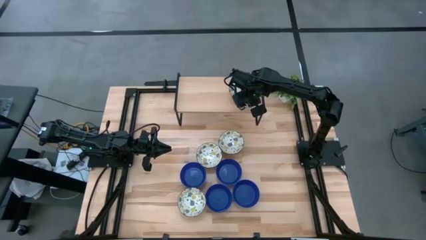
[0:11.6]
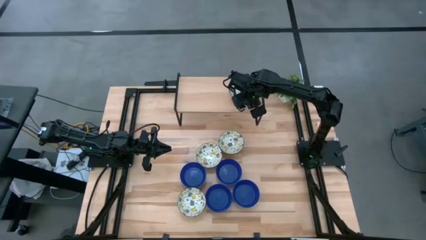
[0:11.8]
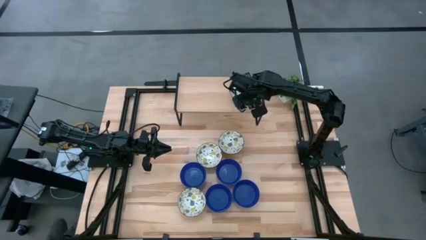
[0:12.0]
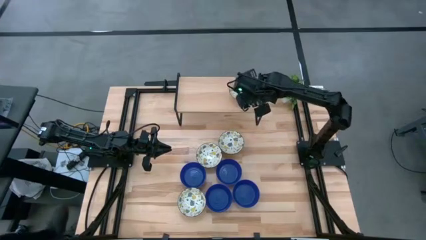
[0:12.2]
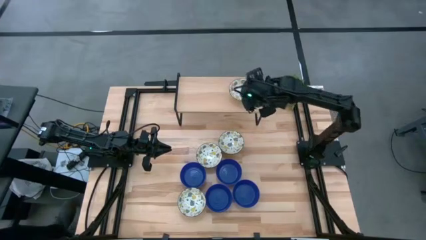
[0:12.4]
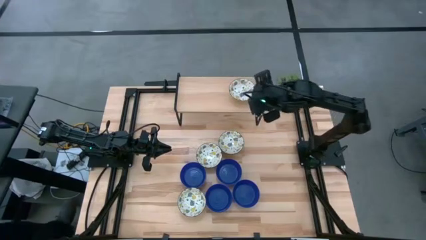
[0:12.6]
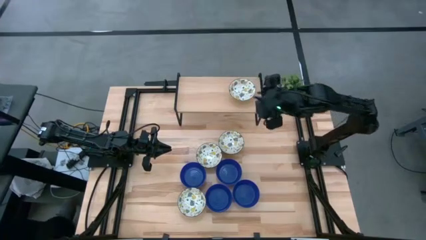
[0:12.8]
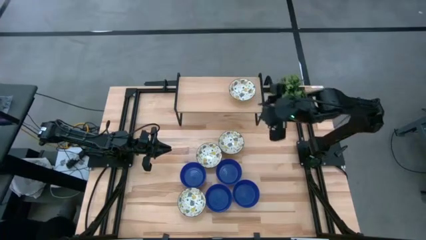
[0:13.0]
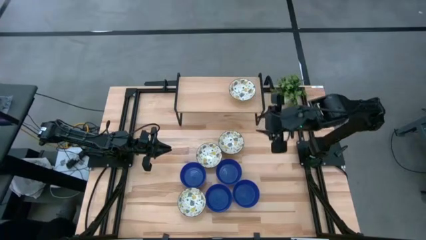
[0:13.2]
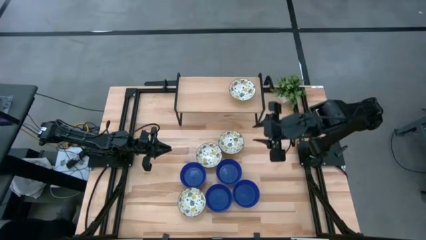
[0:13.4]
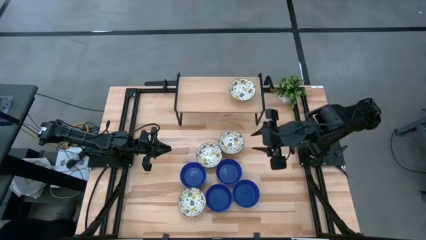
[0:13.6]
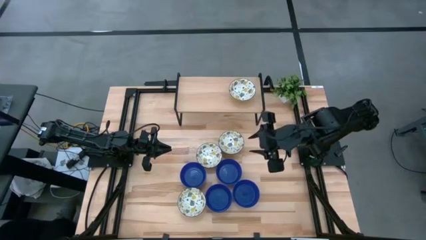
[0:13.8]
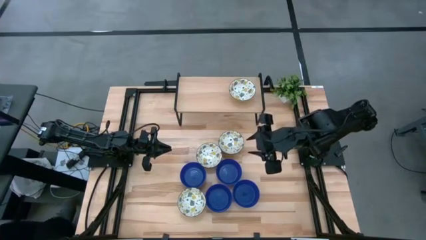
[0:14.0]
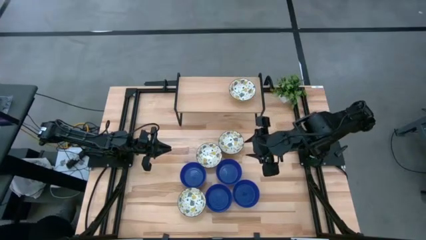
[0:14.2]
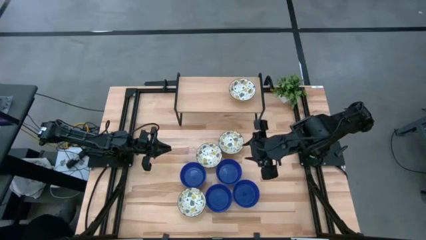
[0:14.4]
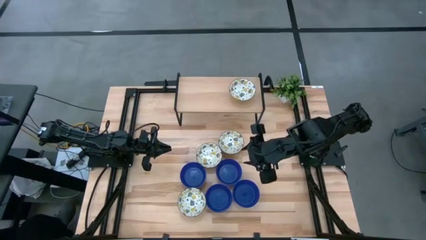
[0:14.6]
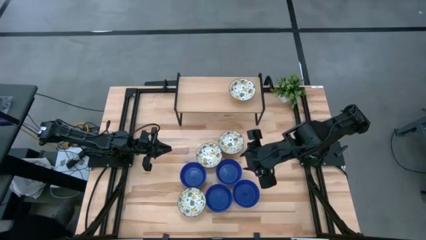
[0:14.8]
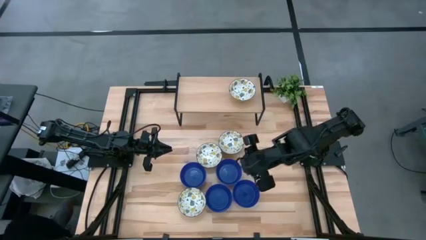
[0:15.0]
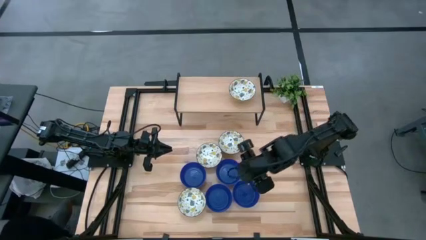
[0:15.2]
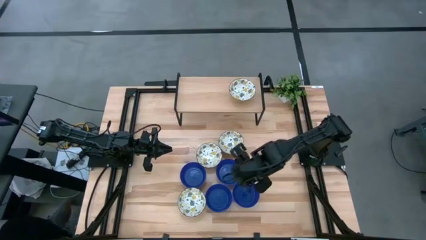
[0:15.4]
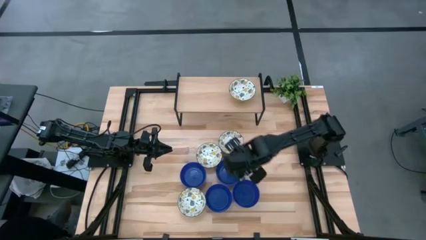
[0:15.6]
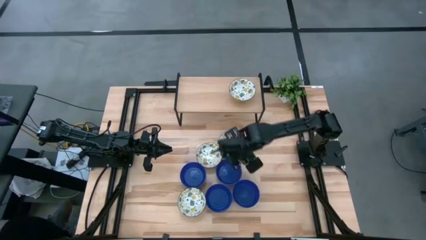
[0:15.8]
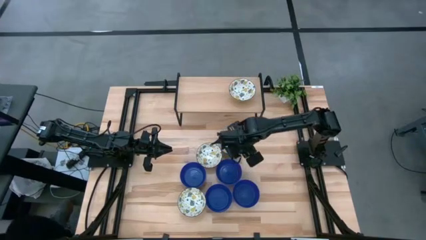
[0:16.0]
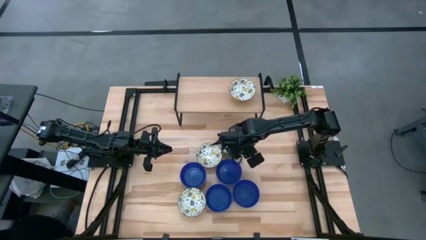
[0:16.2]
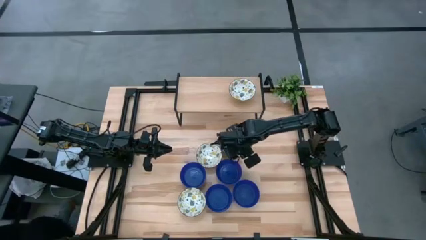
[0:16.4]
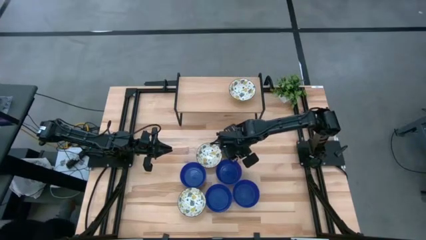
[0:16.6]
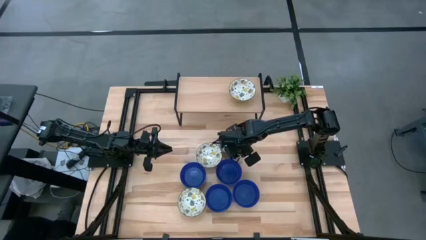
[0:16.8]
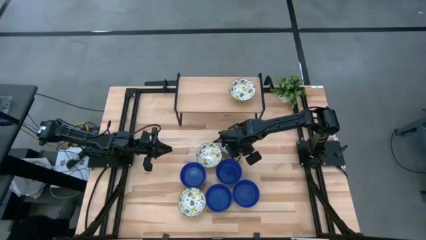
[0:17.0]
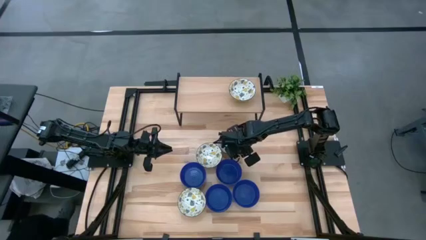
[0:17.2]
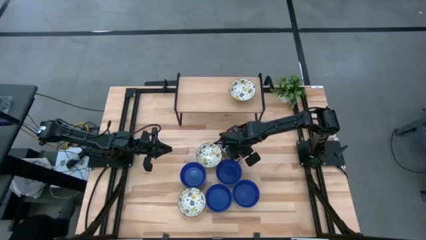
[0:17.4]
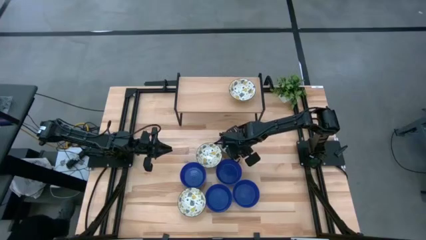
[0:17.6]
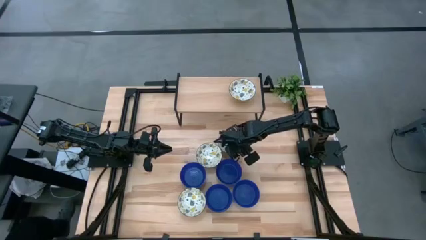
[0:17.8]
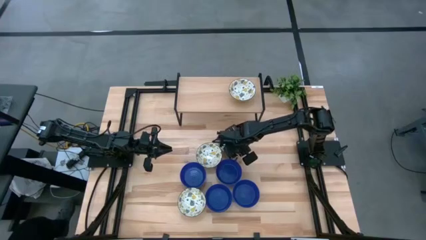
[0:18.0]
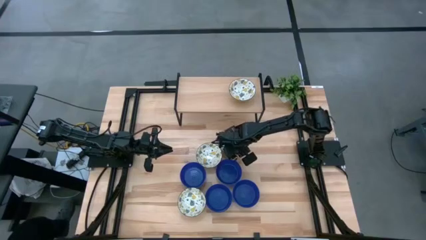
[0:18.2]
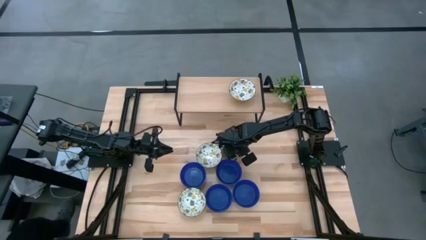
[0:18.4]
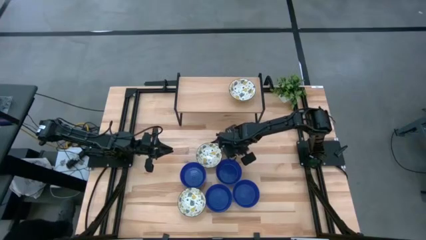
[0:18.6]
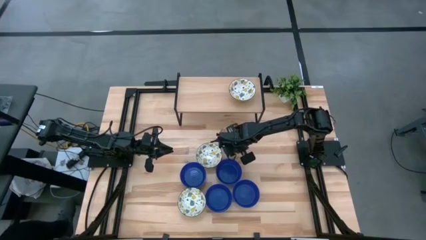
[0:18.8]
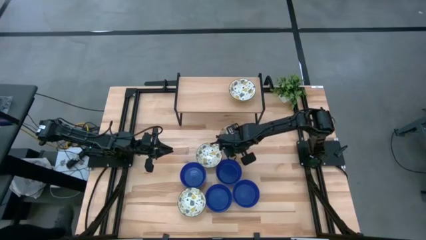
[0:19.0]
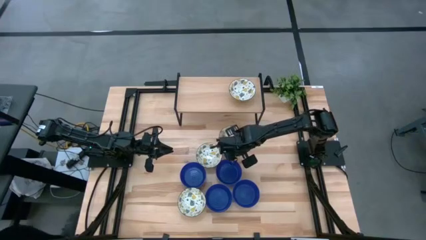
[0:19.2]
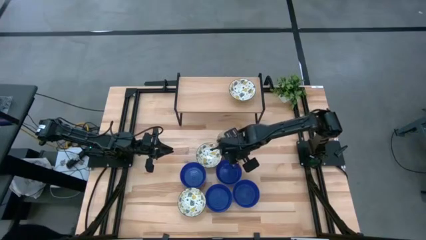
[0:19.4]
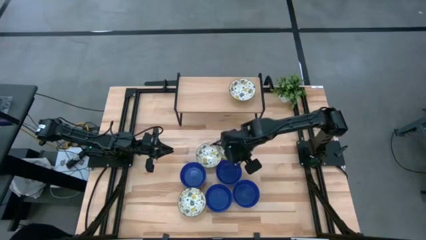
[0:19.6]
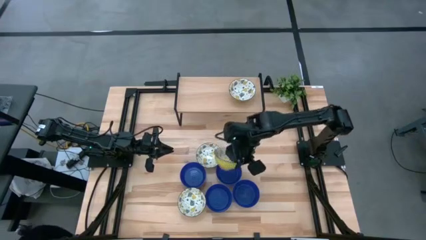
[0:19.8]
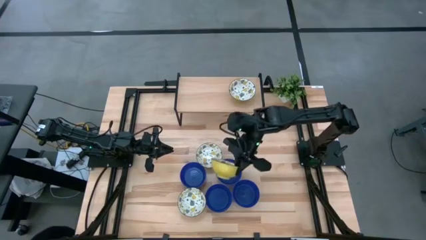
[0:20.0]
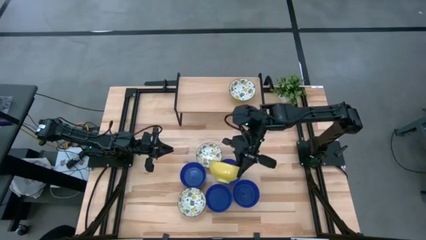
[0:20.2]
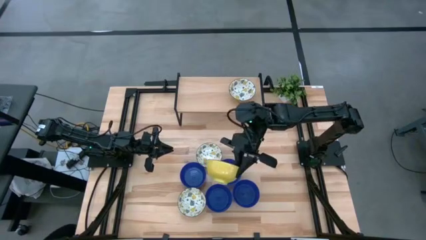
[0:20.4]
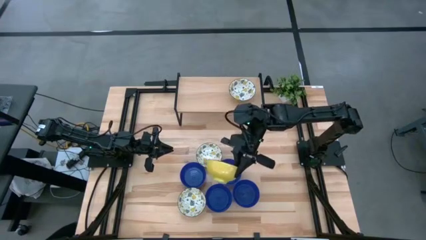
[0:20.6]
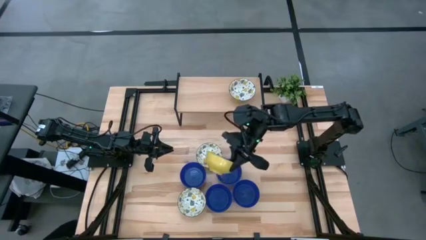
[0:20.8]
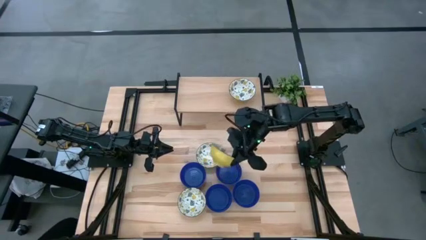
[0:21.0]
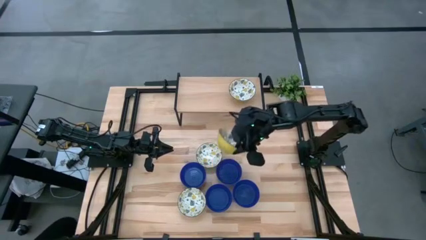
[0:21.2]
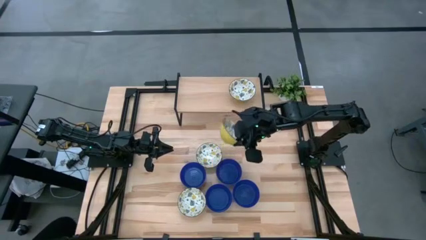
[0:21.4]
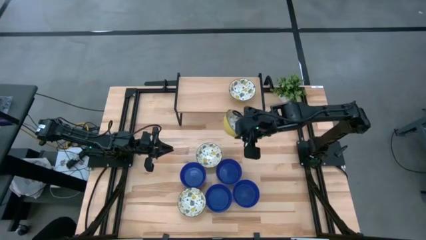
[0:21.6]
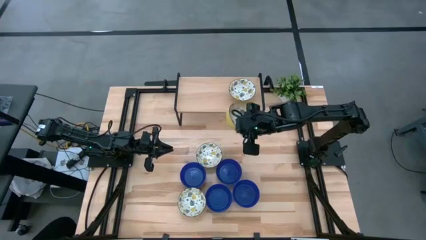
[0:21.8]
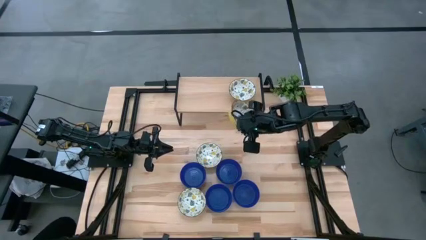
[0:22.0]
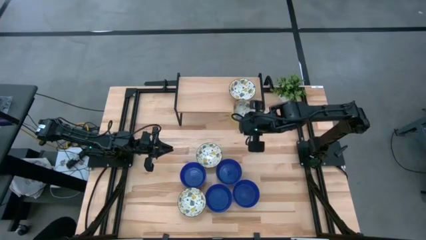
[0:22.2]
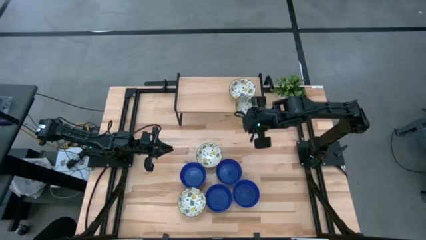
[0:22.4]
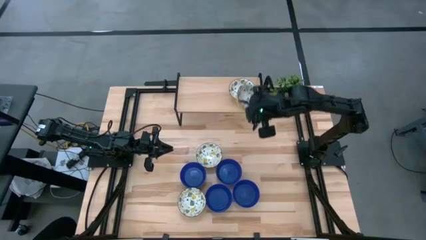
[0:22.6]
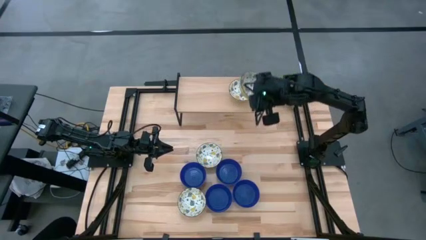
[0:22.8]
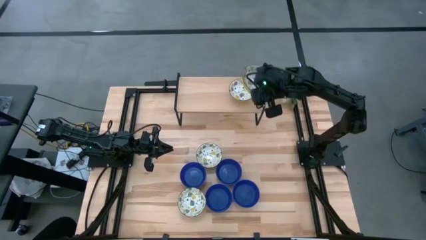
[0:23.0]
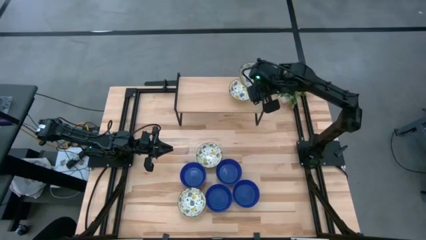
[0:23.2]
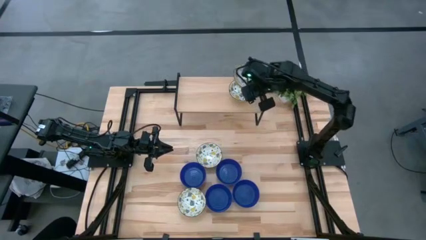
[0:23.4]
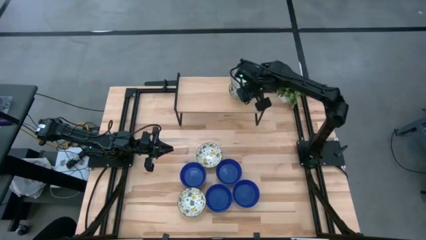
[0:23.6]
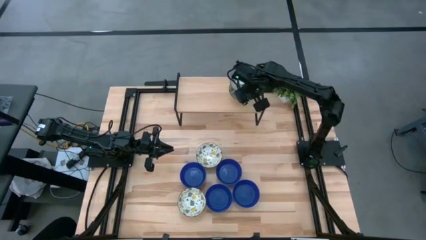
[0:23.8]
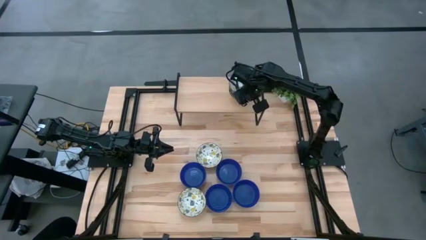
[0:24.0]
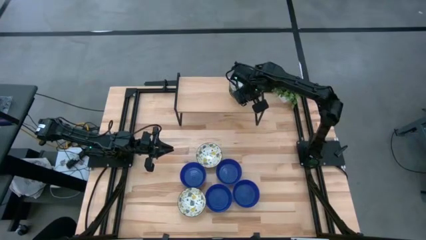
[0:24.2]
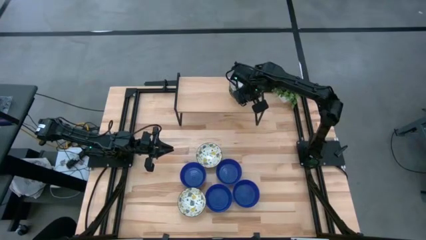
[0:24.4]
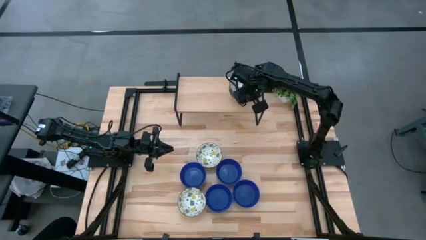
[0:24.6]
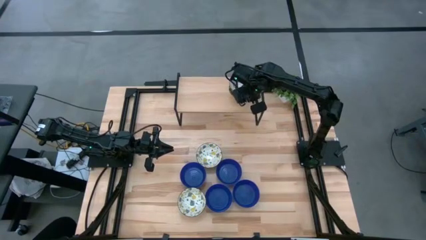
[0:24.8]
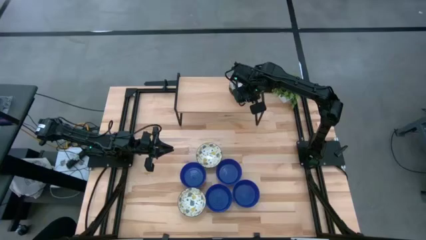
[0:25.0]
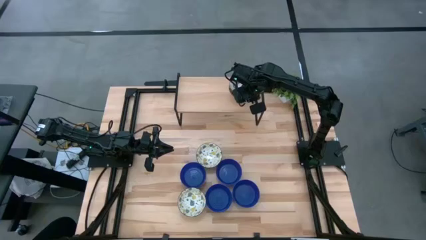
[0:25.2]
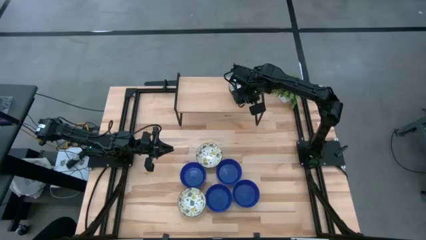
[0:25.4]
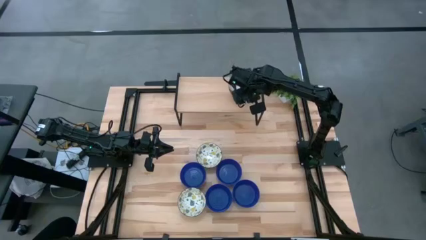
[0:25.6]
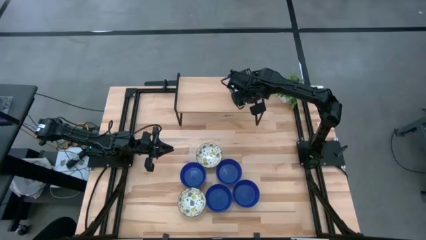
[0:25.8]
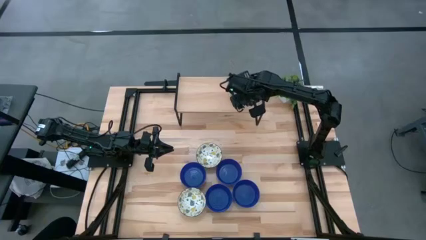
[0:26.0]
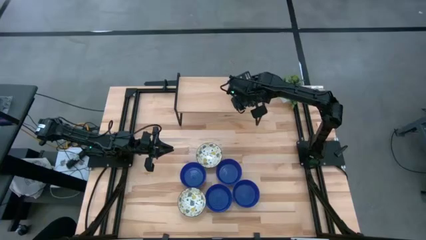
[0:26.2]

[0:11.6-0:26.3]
Task: Pick & Place Mini bowls
Stack the bowl on top of the yellow bowl on the shelf

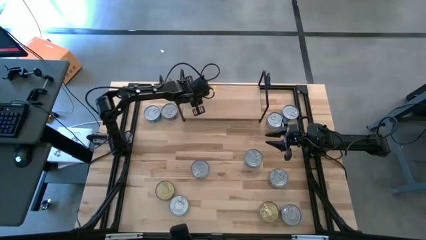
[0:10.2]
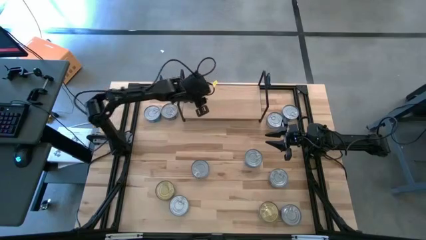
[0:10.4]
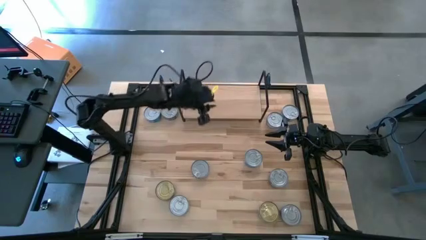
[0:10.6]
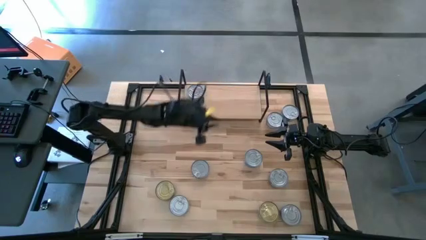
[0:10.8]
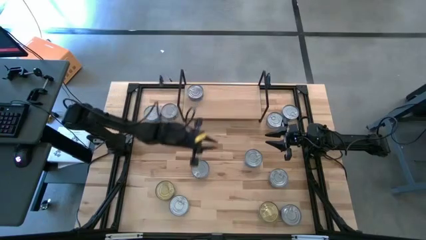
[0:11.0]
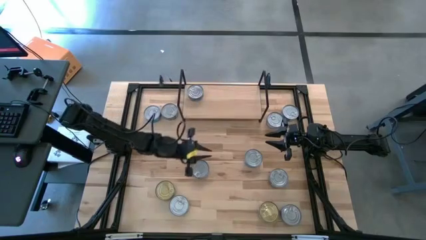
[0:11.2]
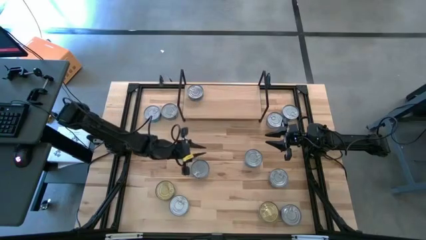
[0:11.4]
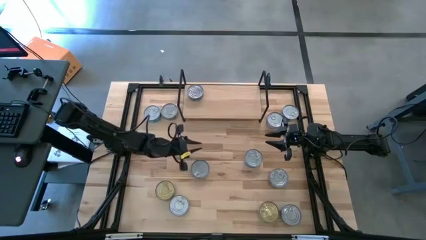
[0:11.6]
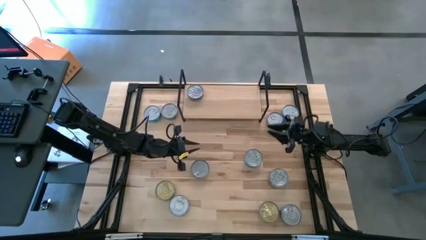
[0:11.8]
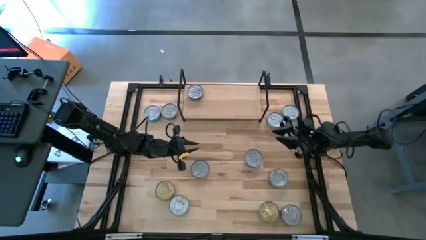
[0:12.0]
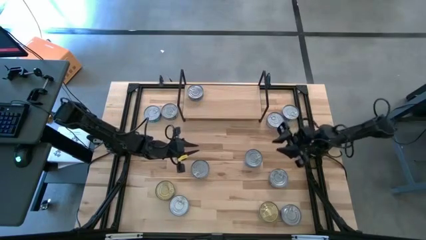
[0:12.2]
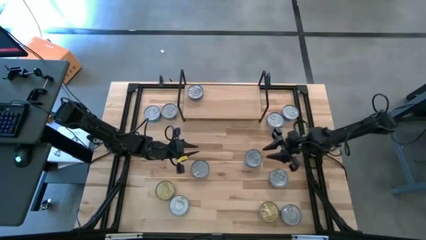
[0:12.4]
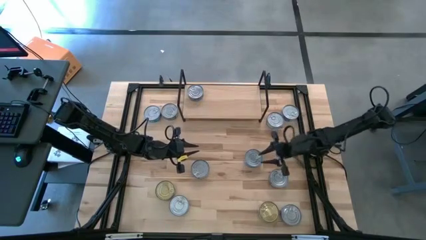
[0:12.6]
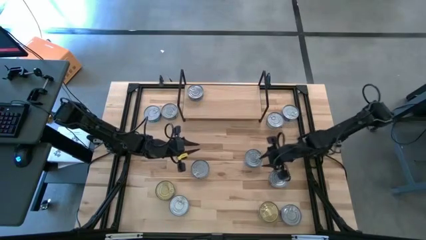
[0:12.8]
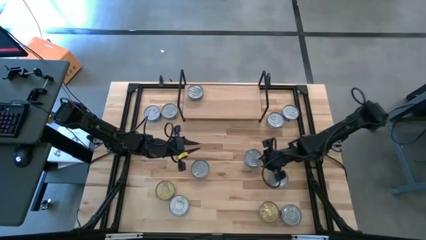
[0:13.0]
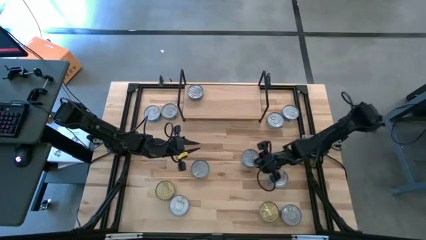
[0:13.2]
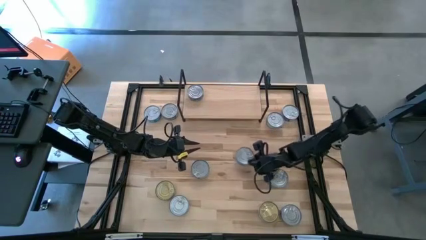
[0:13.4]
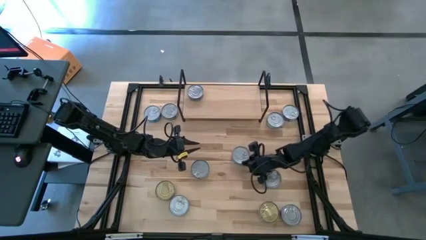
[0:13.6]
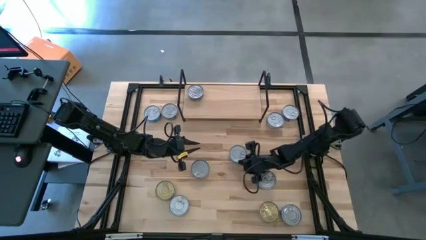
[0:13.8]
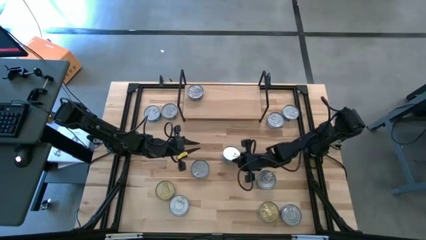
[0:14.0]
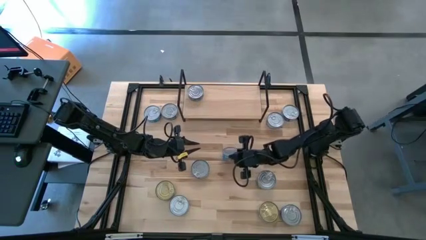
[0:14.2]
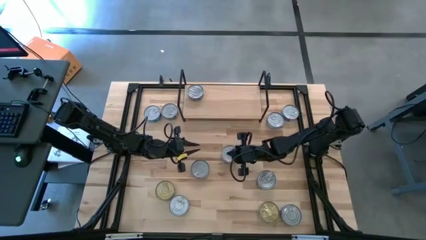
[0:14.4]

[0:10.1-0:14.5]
Task: Stack canned seafood by type on shelf
Put the yellow and blue tuna can on the shelf
